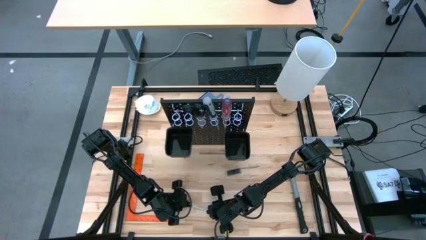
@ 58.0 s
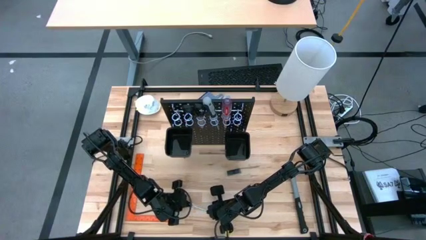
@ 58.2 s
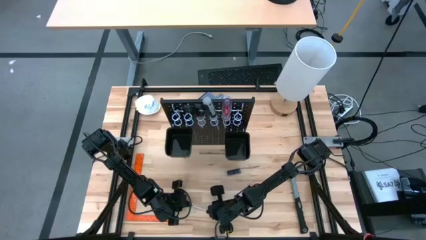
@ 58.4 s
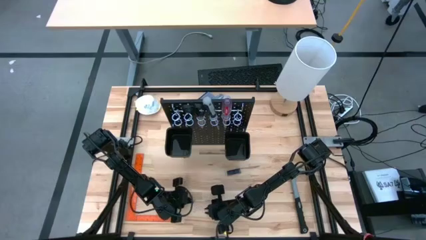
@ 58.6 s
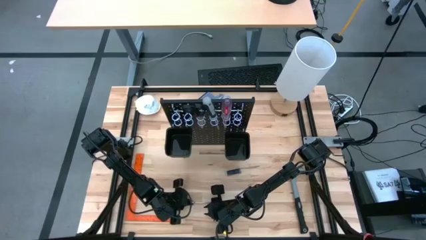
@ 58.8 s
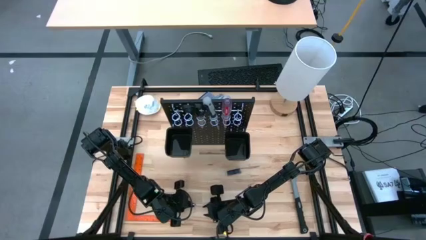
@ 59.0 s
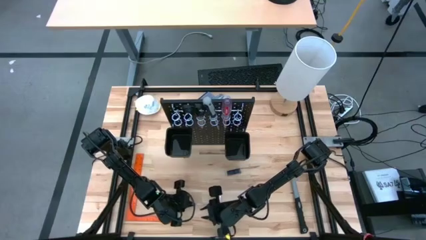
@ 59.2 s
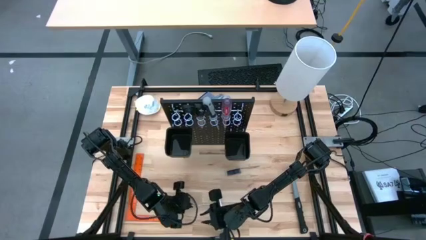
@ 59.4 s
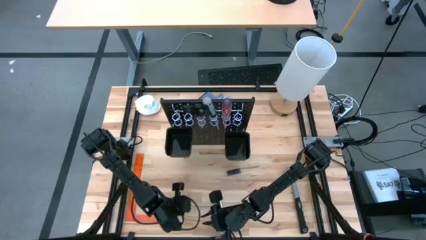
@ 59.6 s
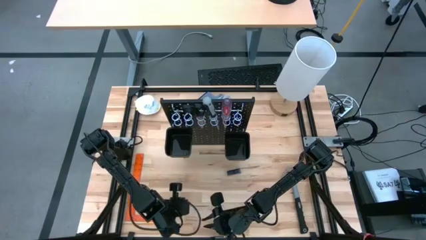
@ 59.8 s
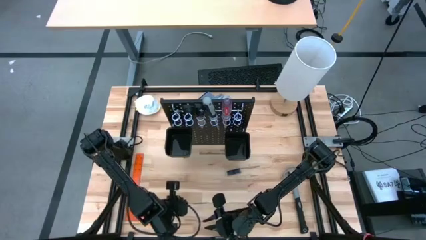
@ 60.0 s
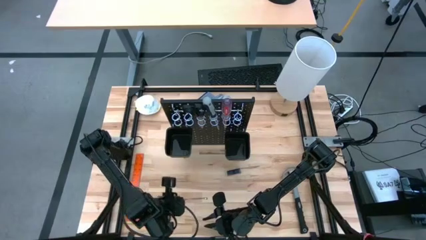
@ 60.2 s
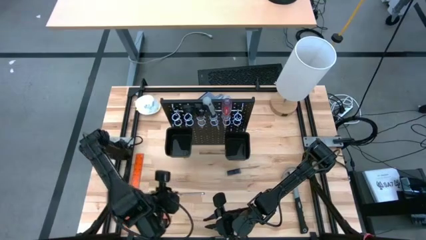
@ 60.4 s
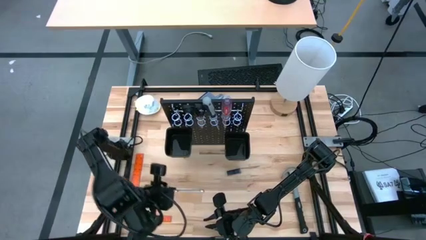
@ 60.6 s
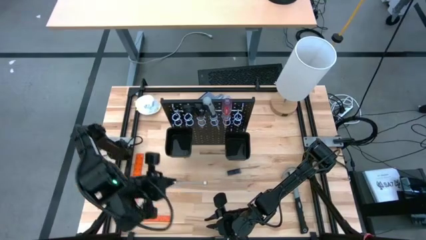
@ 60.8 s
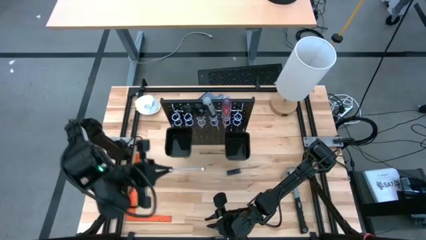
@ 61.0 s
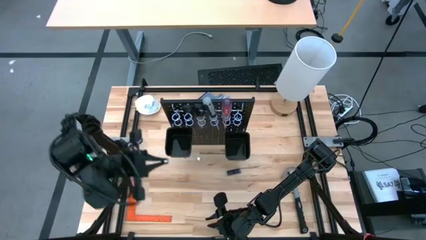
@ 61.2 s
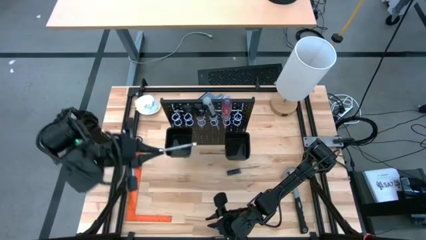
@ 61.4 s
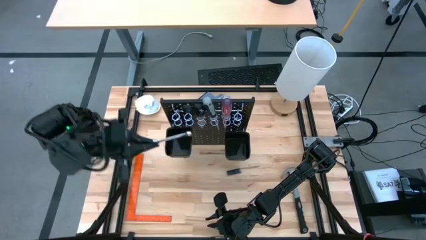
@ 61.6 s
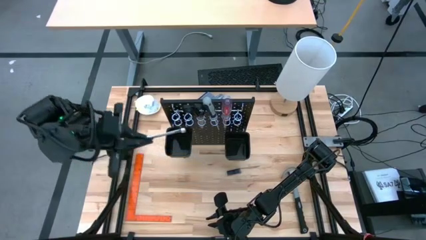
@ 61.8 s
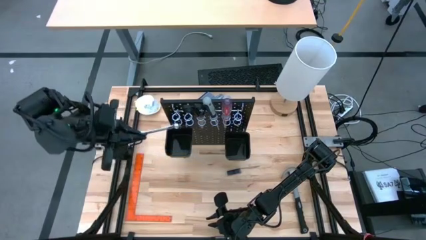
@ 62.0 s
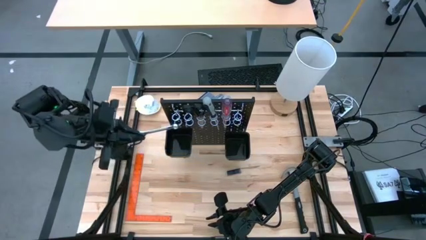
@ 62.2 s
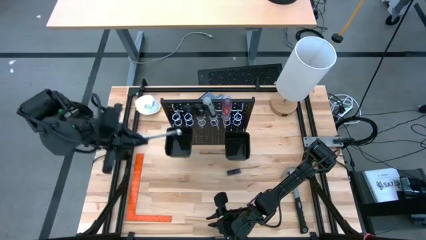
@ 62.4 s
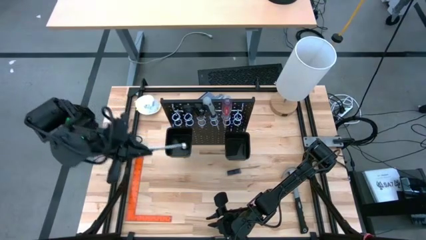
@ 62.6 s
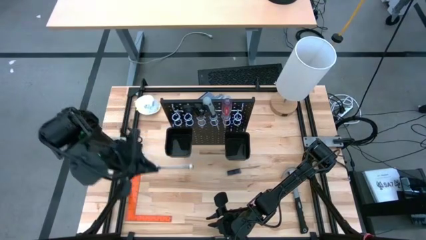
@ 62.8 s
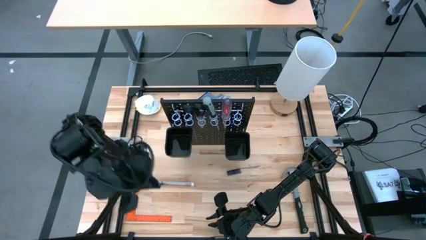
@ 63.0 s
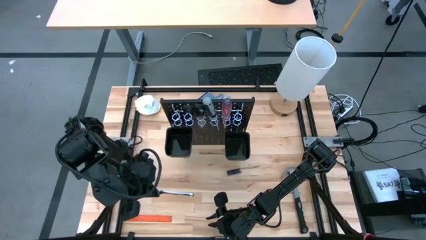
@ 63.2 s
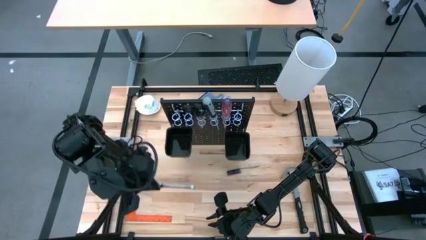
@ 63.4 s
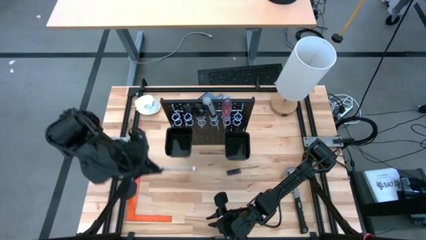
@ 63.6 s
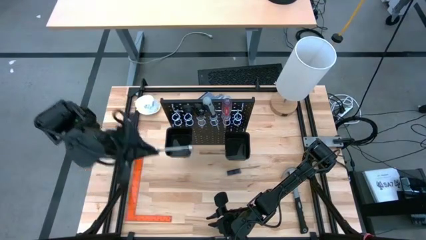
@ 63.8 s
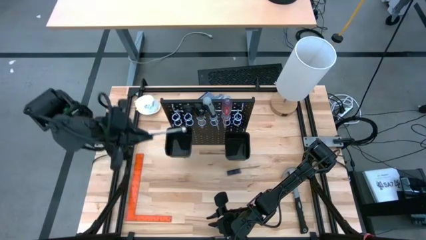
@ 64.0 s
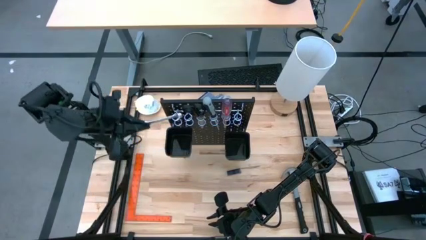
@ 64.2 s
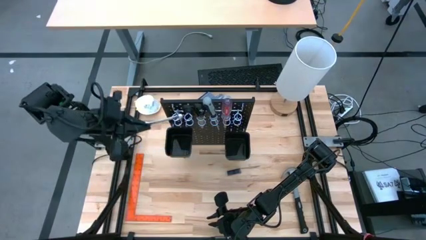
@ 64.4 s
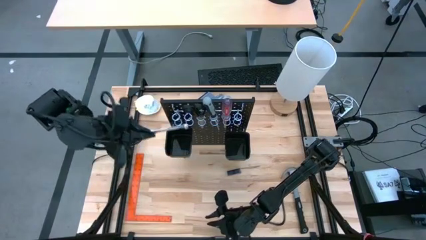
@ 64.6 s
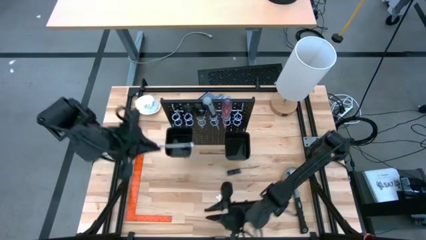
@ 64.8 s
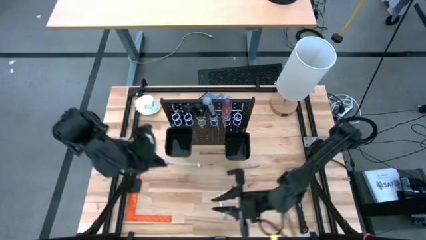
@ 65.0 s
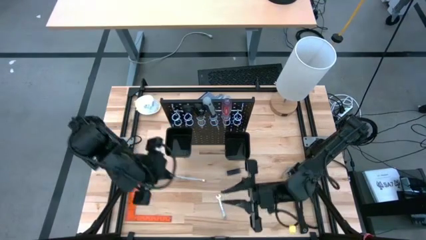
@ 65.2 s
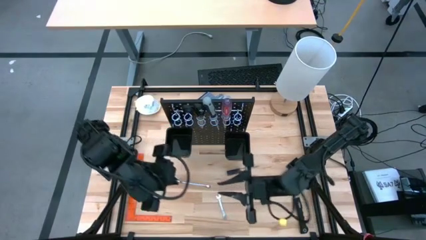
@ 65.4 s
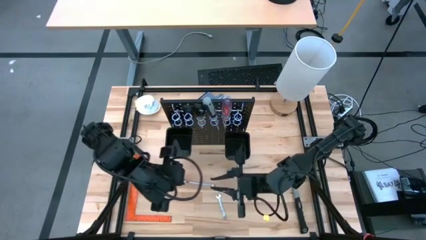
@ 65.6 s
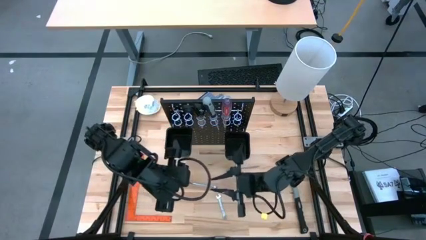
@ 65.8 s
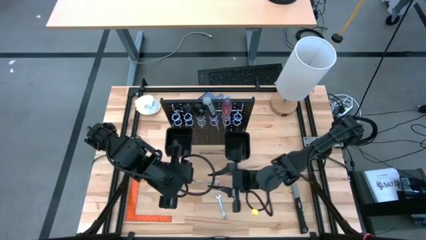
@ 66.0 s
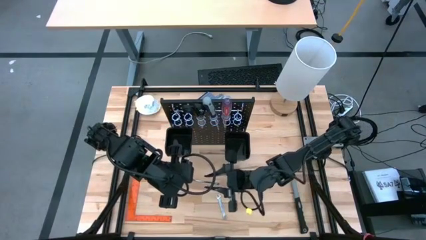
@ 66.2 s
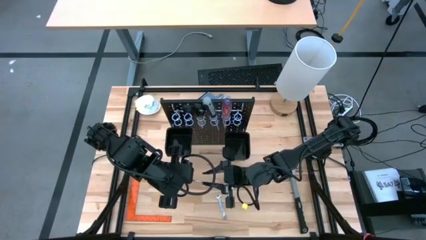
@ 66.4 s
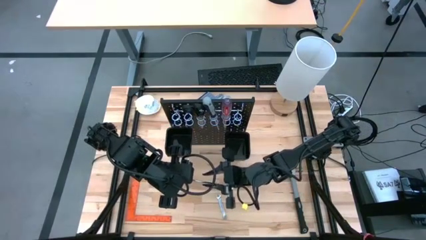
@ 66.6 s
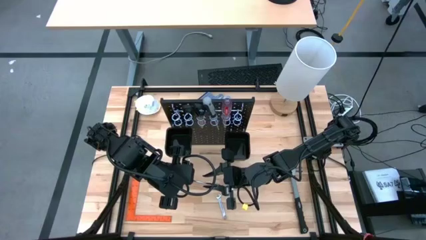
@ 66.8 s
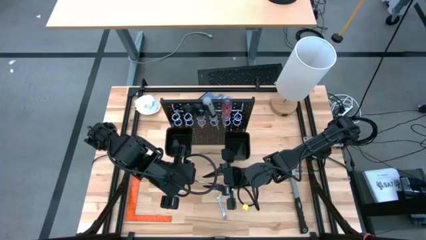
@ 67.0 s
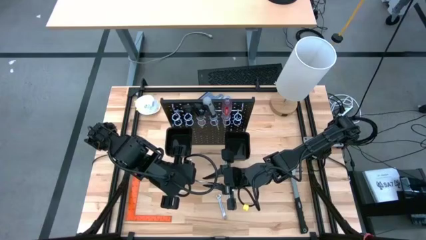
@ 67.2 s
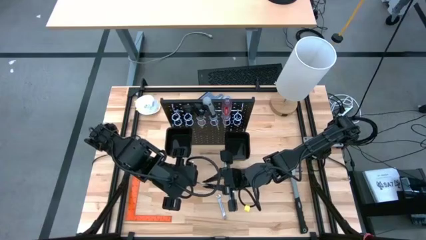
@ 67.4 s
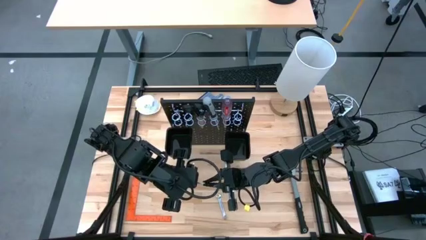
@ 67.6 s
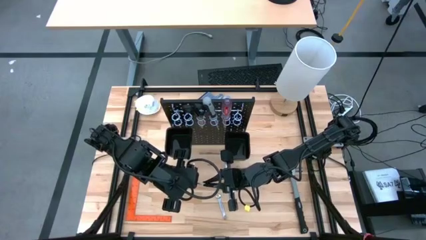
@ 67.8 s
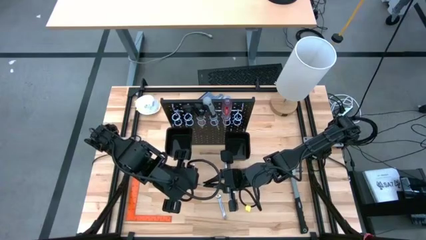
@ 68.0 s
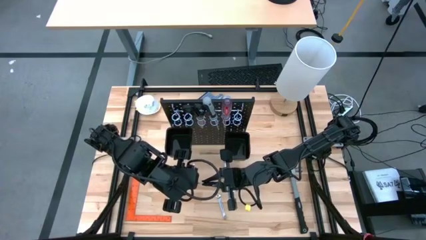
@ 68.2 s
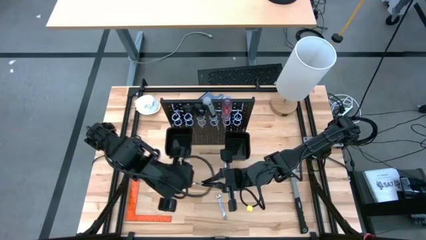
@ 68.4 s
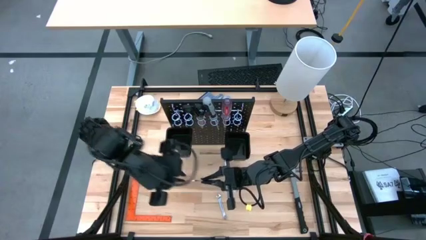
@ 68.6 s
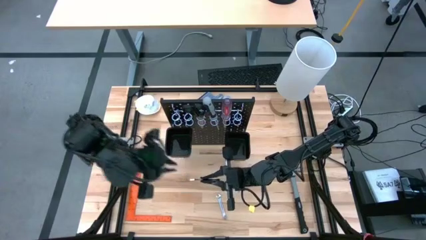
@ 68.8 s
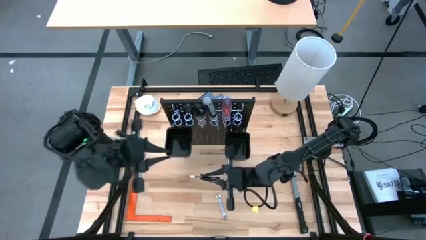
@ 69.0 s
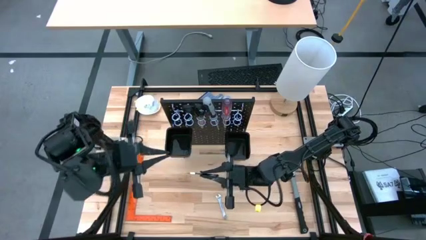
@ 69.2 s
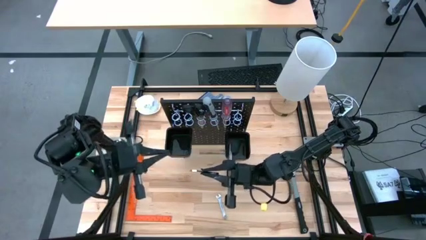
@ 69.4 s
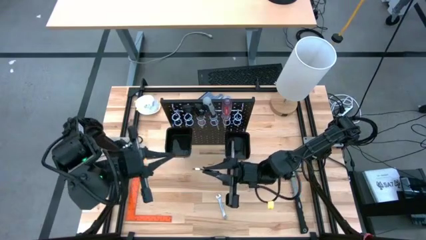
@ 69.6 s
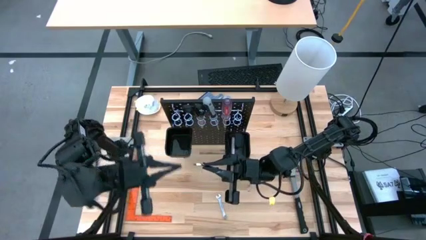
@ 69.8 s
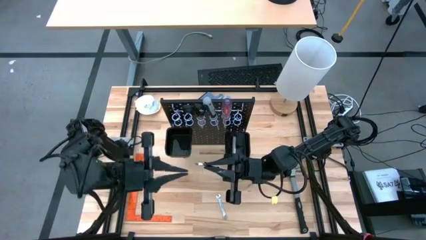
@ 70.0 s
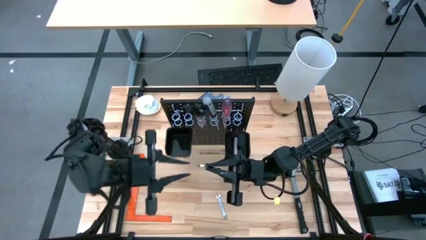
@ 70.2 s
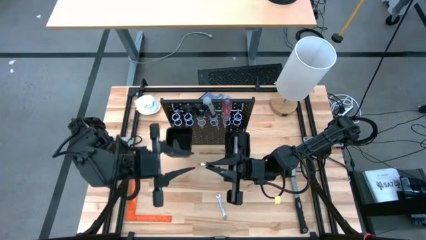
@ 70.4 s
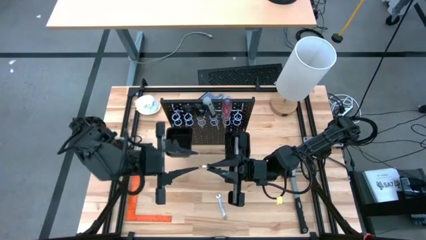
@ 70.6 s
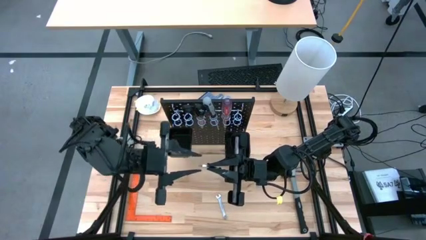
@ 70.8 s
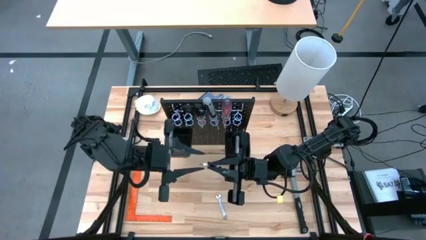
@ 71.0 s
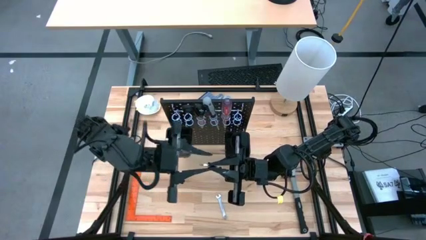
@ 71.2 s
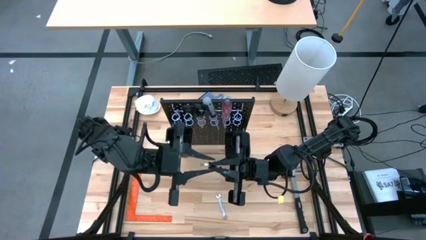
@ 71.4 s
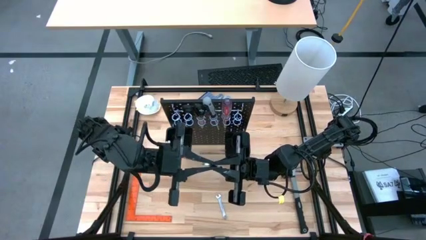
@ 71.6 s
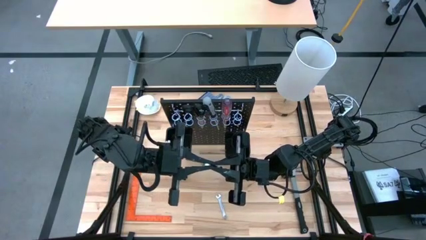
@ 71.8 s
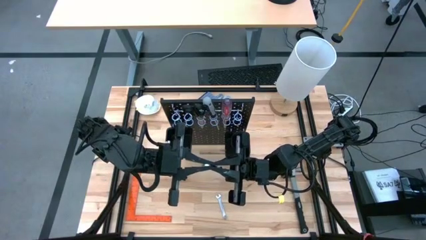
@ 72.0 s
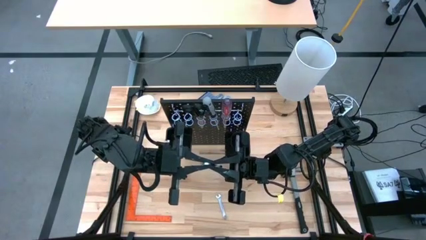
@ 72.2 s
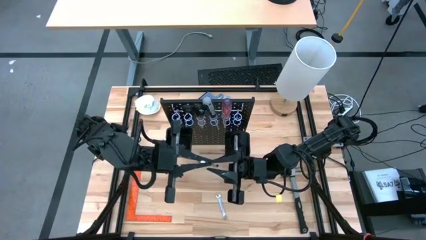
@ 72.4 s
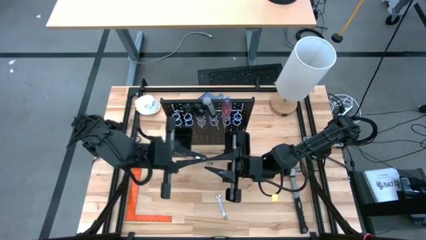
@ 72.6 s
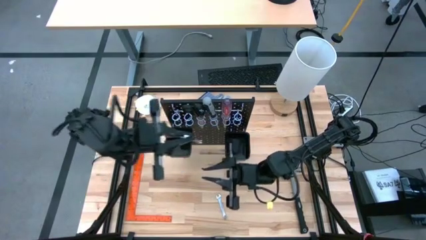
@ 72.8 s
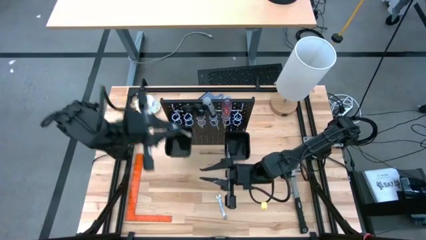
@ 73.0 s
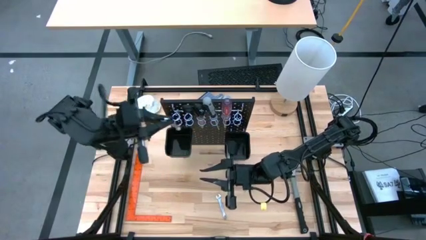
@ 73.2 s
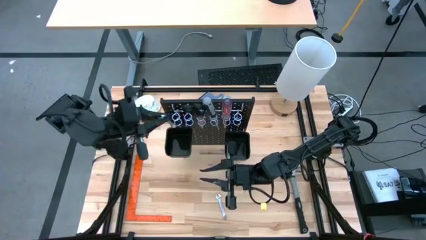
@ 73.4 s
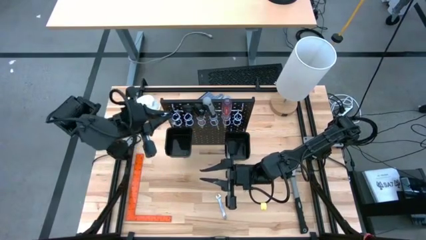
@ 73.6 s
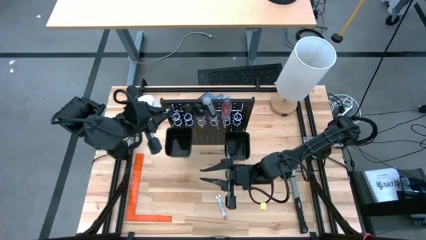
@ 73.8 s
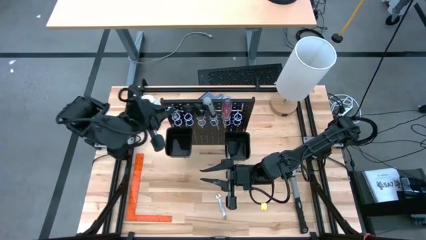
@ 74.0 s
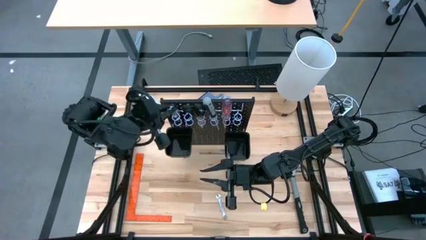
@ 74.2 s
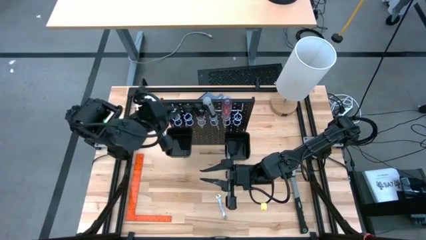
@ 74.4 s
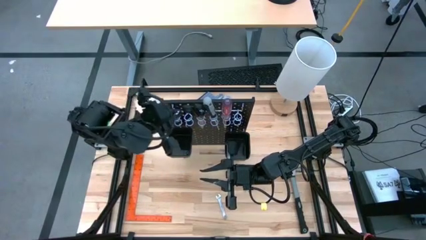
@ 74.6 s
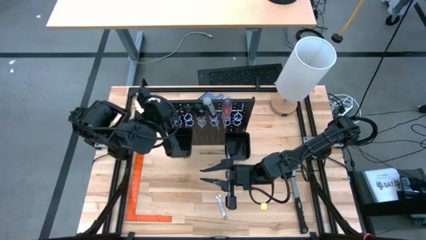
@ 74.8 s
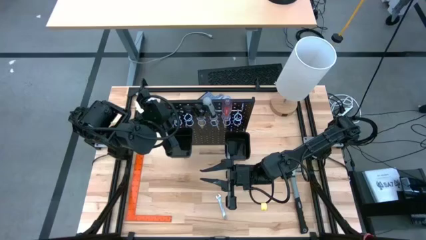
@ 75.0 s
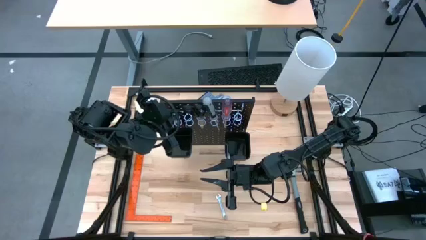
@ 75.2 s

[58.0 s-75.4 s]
Task: Hang tools onto peg board
Hang the silver wrench on the black peg board
